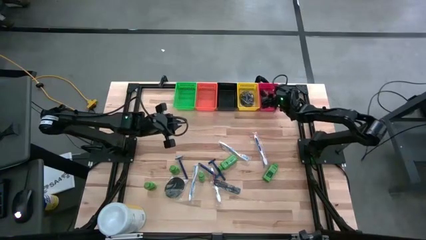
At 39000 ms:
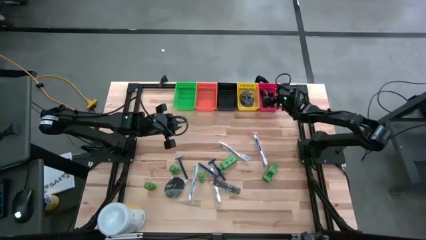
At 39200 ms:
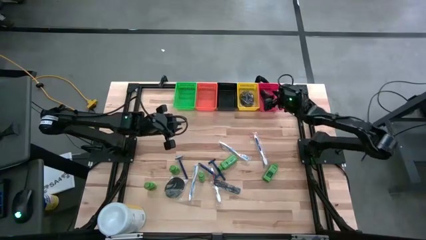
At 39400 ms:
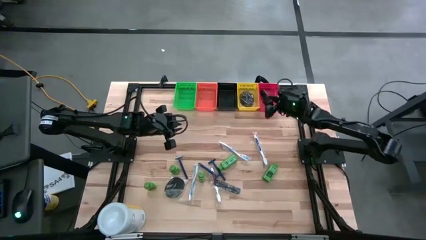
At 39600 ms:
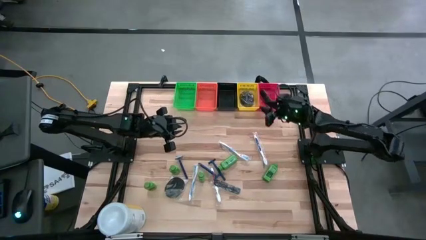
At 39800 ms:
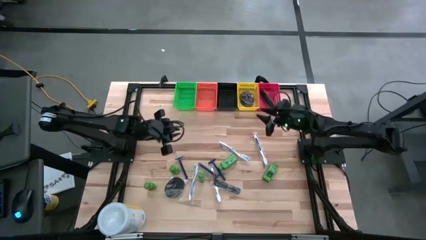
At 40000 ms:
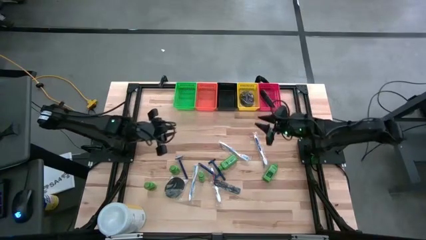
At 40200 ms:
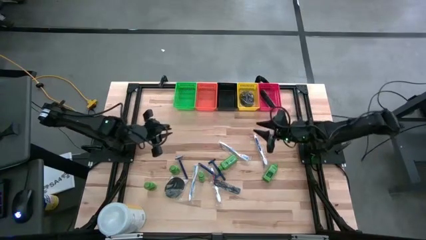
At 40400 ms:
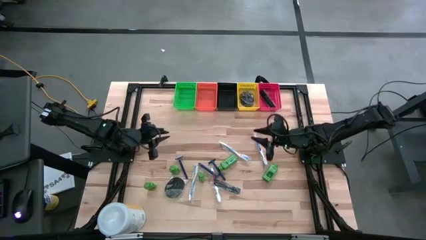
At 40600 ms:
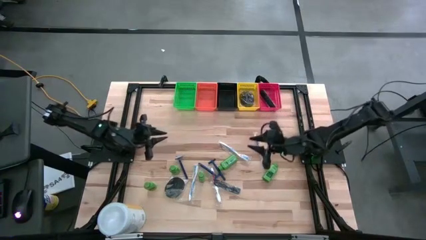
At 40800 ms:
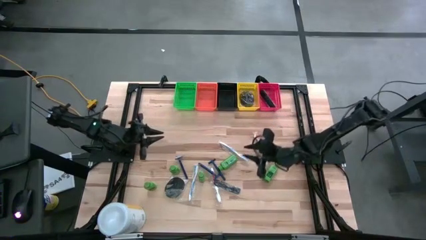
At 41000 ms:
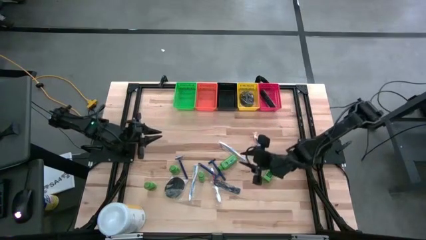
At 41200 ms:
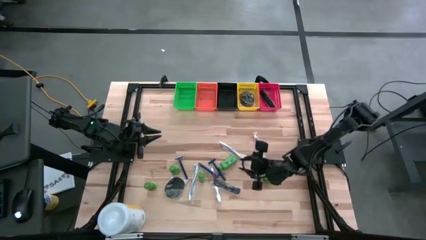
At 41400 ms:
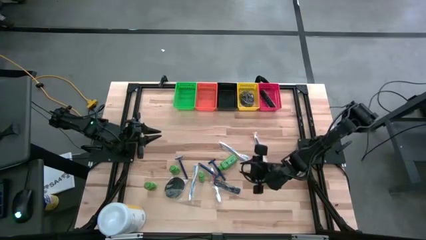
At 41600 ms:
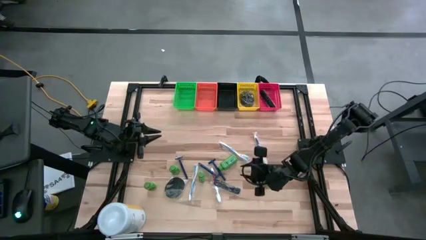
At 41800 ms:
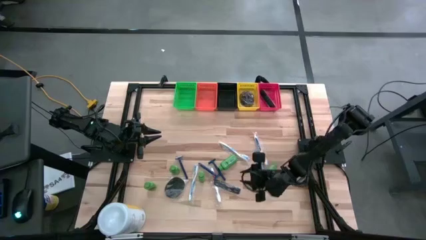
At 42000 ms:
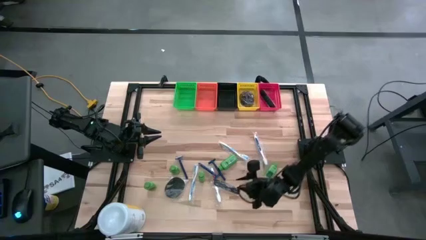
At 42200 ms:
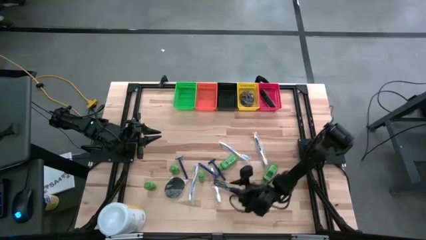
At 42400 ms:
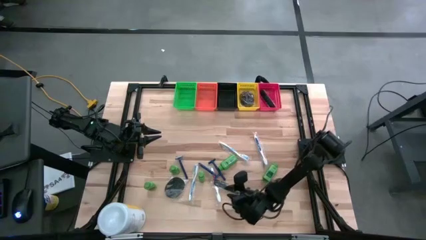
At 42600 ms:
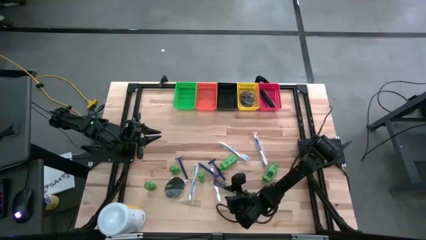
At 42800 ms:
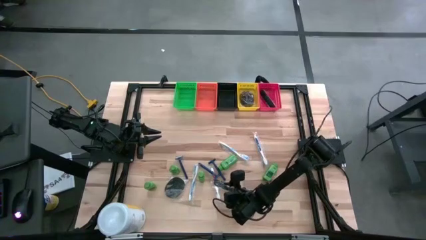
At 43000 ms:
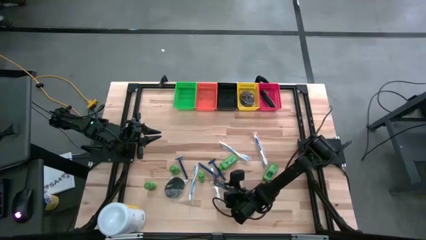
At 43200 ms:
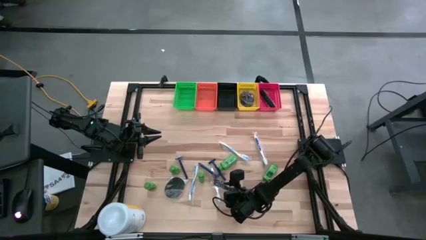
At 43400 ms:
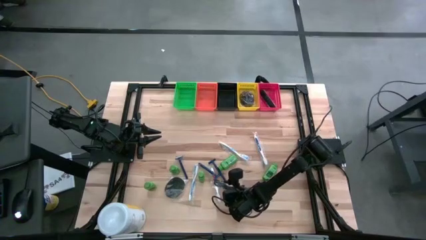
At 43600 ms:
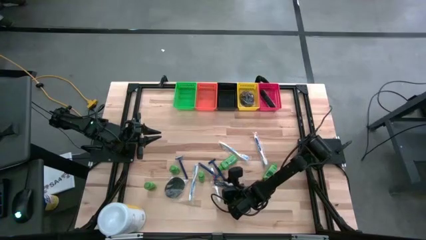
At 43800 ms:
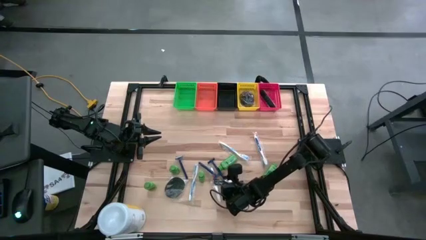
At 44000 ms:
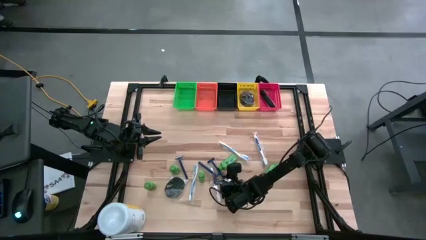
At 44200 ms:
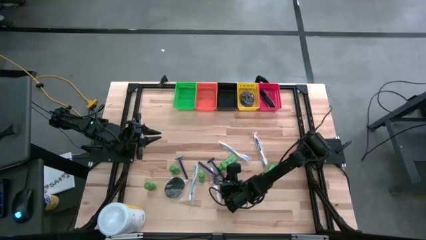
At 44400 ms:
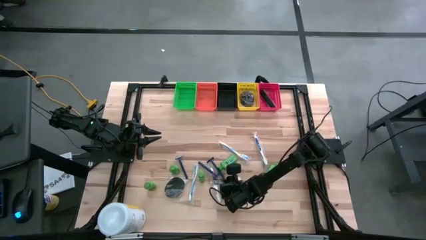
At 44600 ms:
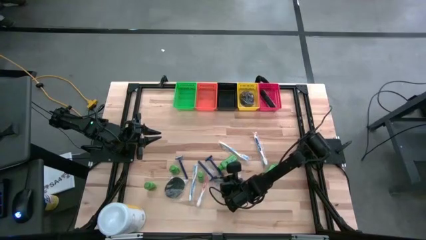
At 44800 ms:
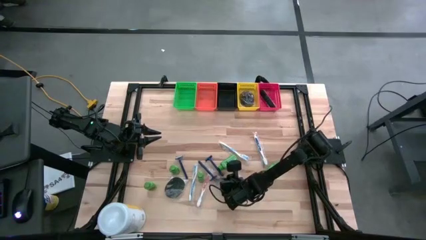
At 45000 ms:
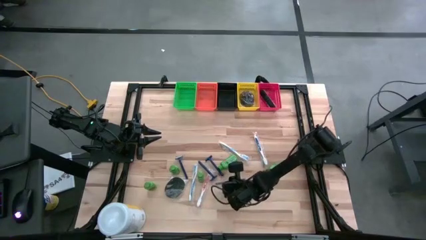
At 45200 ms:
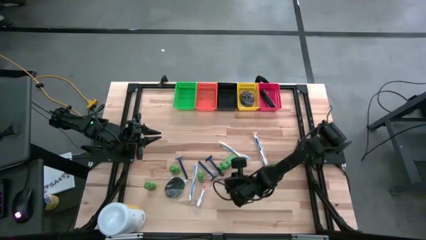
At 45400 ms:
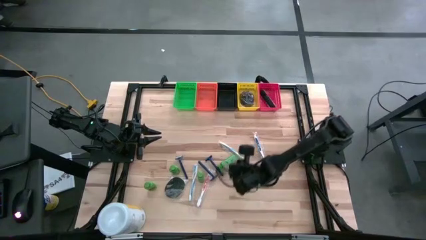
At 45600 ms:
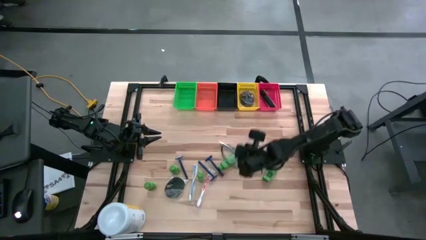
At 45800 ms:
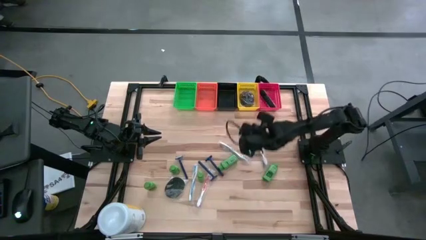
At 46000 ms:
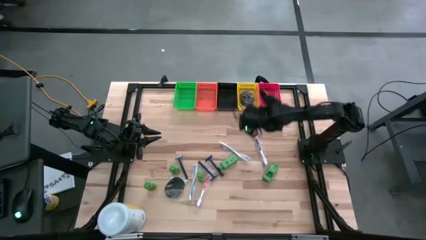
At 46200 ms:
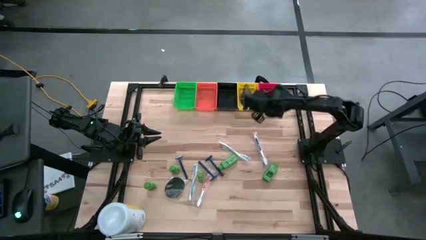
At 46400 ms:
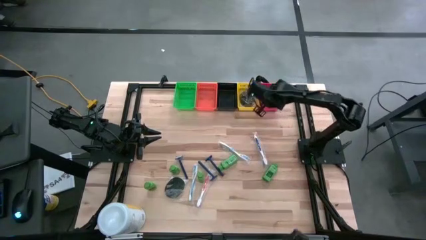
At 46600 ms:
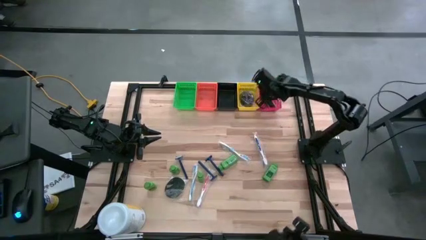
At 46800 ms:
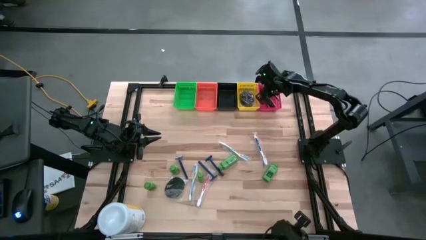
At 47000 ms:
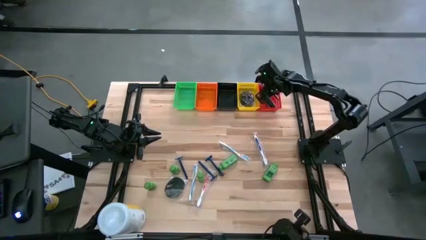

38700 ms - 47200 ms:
Task: Pick & Place Travel size toiletries
Put the black comb into the red bin

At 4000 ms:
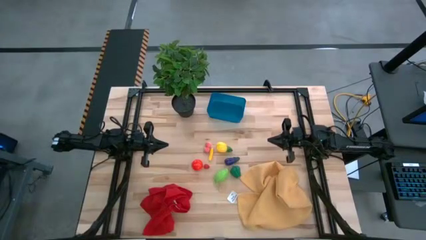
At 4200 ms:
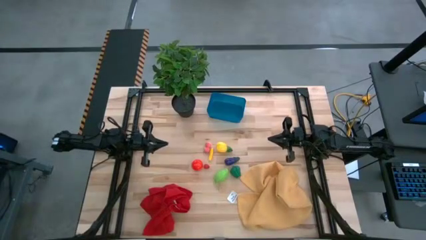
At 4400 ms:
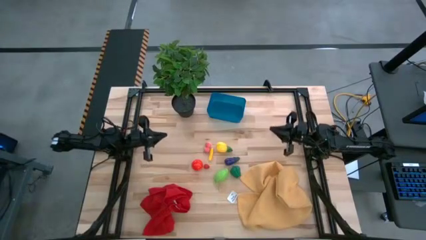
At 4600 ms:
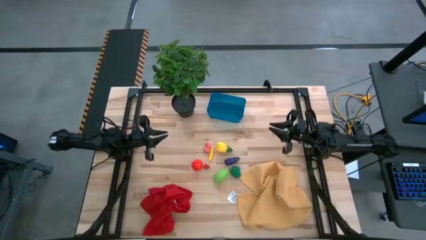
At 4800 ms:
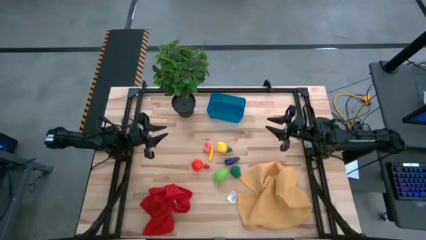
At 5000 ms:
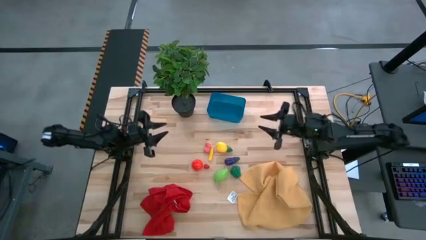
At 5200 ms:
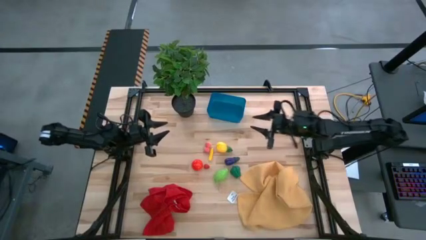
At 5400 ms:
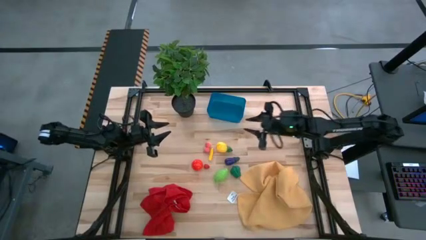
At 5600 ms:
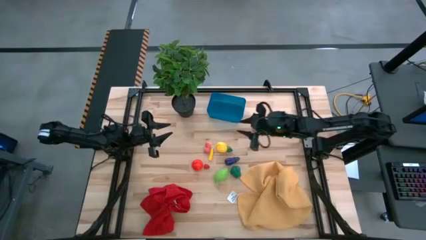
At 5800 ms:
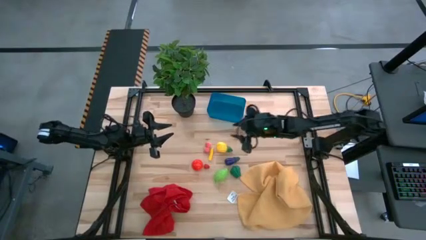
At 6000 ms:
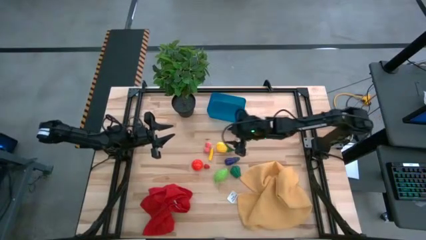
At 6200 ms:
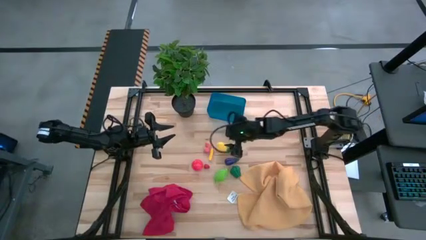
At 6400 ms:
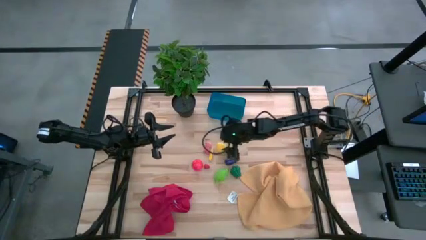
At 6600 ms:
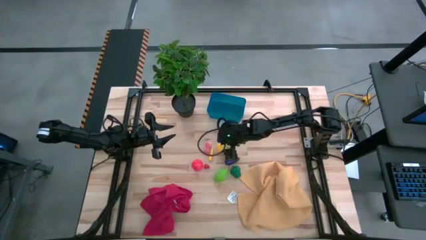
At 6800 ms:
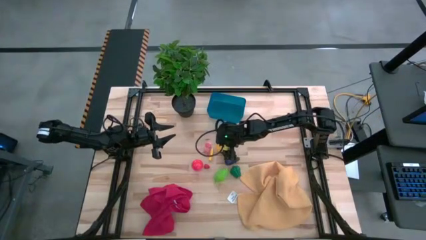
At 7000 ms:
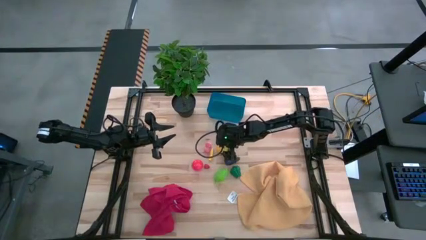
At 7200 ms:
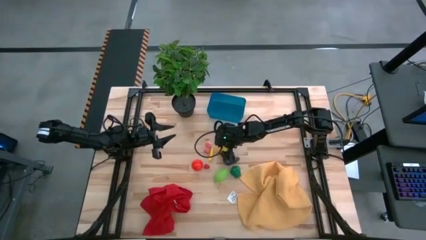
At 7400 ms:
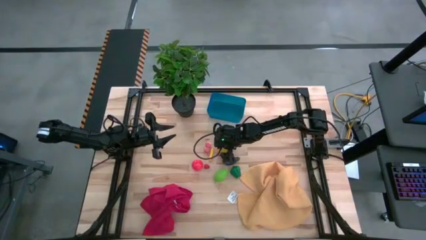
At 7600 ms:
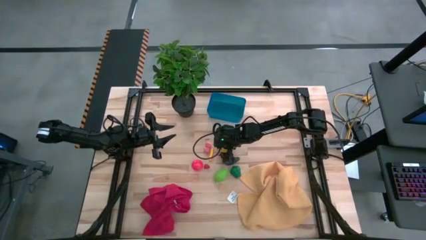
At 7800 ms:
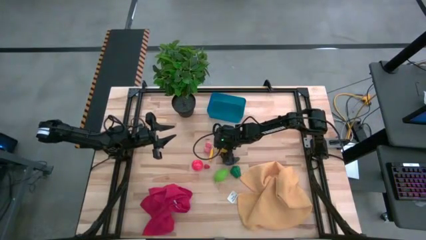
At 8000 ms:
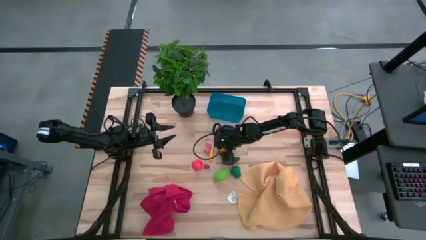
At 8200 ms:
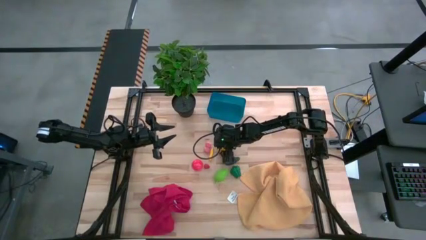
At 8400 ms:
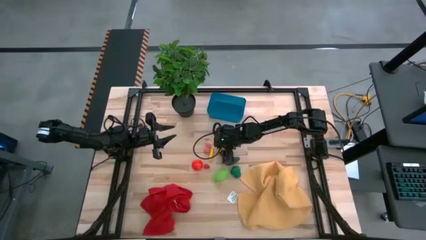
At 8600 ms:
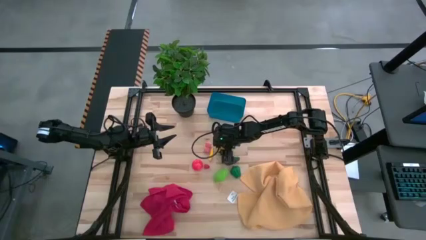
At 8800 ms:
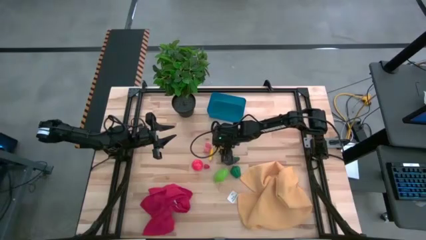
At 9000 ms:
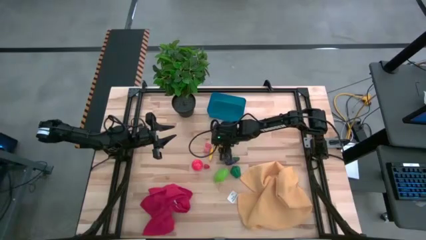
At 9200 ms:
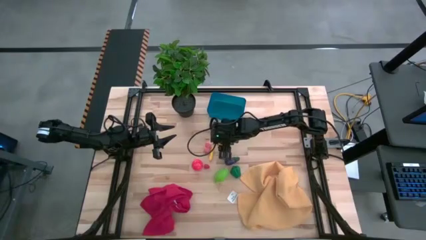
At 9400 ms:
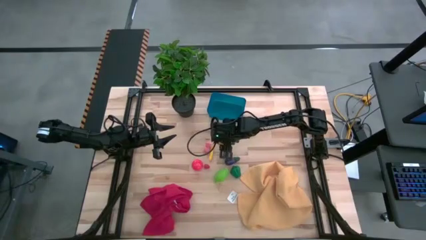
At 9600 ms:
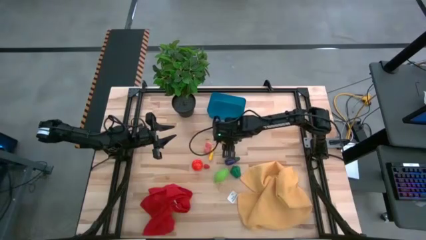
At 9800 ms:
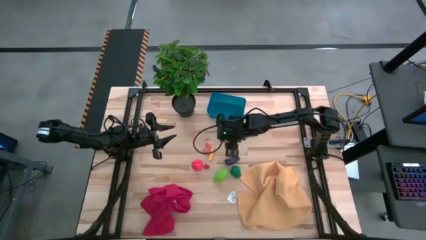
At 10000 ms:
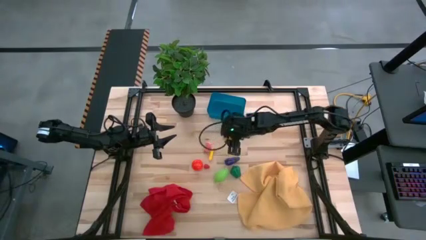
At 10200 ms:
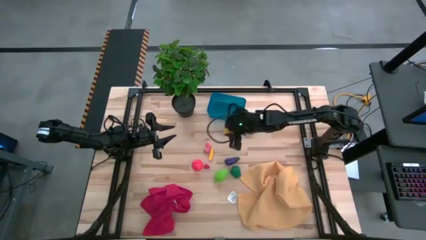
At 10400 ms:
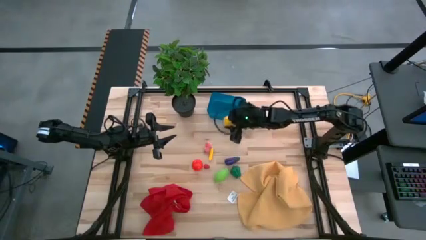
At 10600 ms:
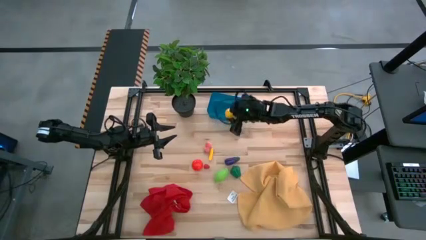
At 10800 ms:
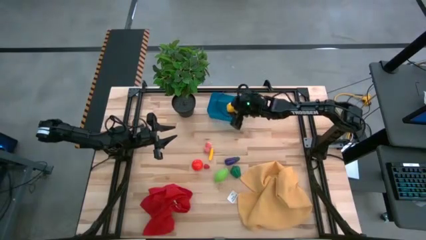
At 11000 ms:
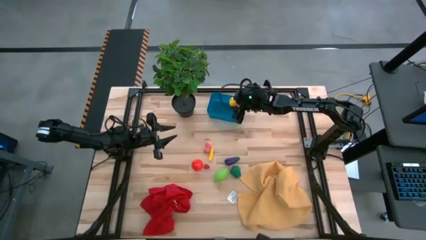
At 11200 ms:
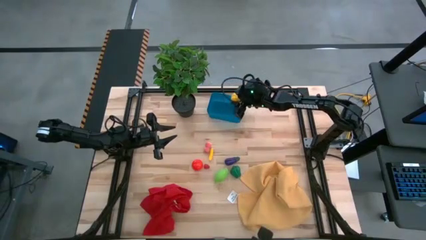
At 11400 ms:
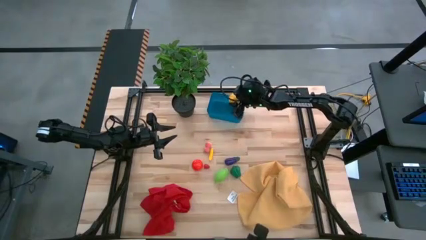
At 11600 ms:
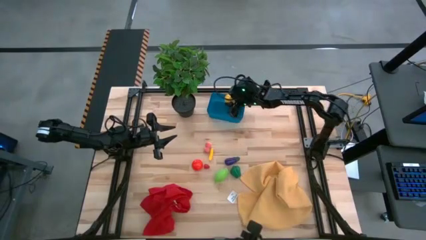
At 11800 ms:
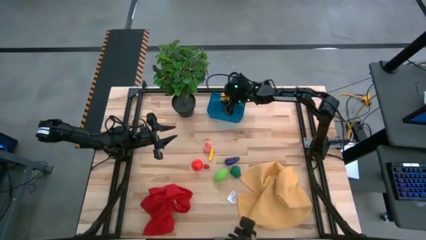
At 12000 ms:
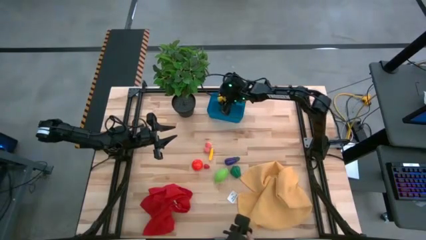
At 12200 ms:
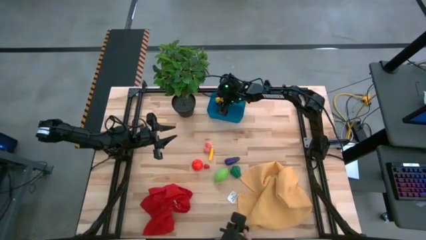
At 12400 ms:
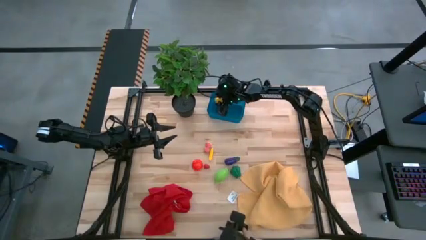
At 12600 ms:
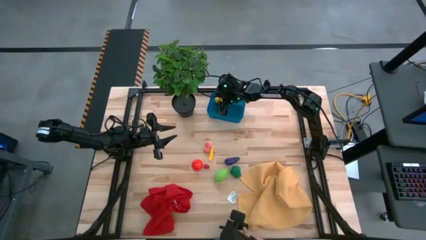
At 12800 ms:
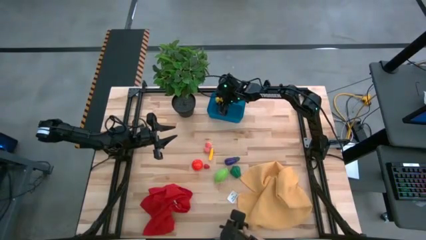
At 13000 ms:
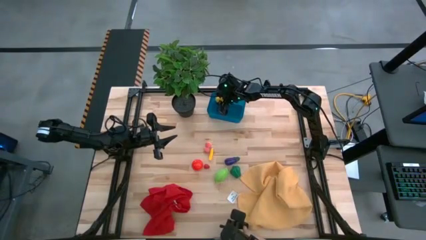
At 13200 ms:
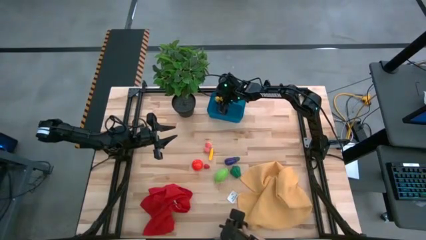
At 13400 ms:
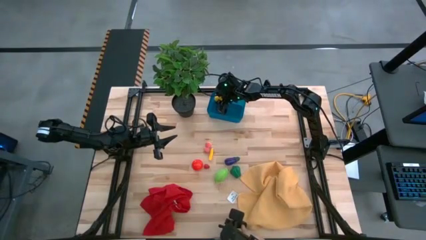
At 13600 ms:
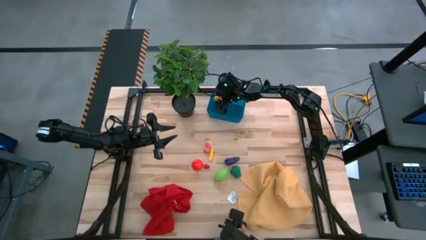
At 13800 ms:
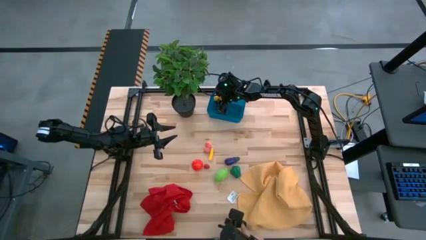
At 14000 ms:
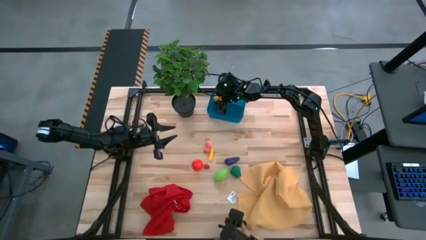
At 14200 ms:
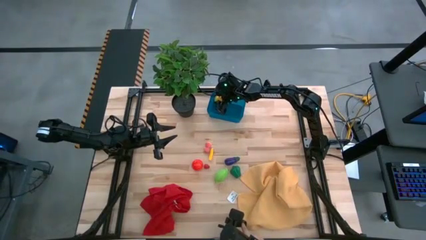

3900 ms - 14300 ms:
Task: Pick and placing Produce into tupperware
Put the yellow pineapple into the blue bin
